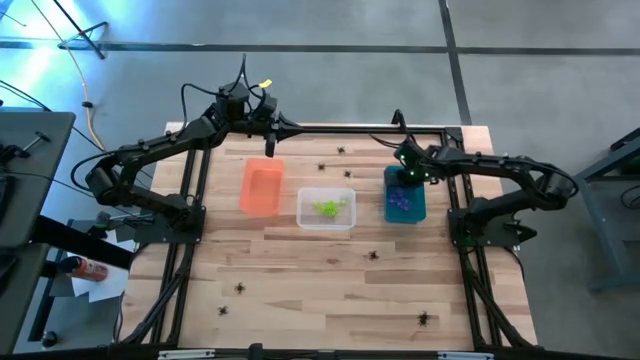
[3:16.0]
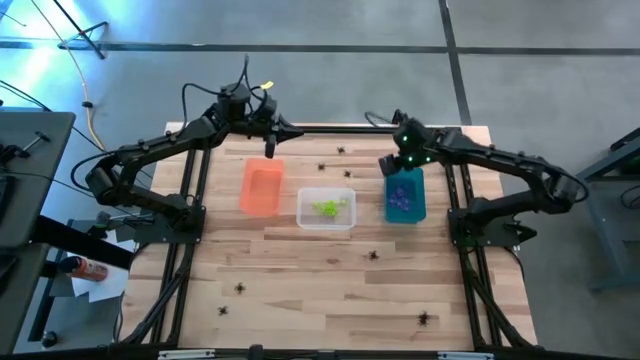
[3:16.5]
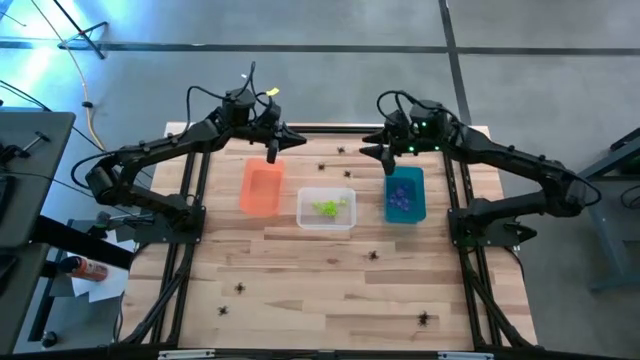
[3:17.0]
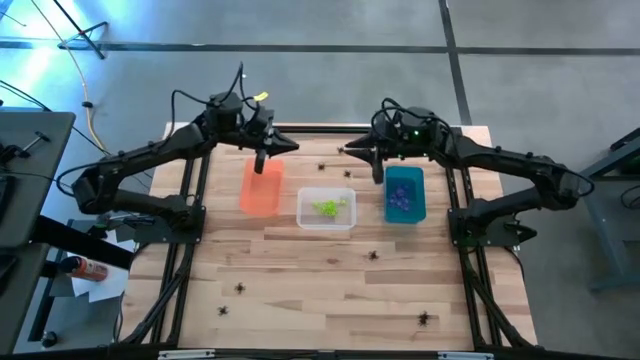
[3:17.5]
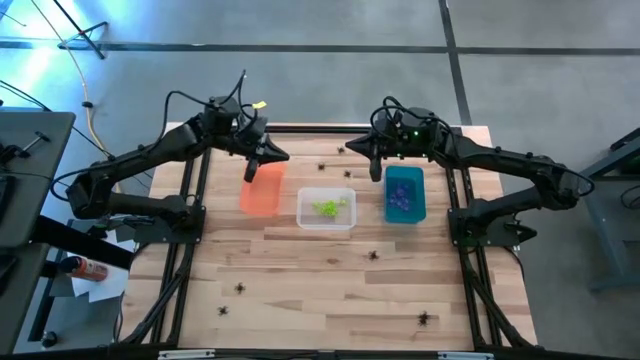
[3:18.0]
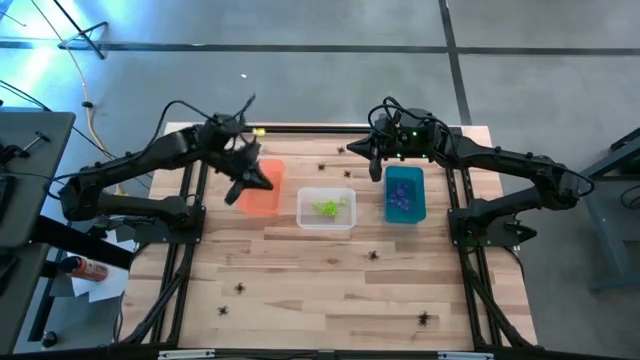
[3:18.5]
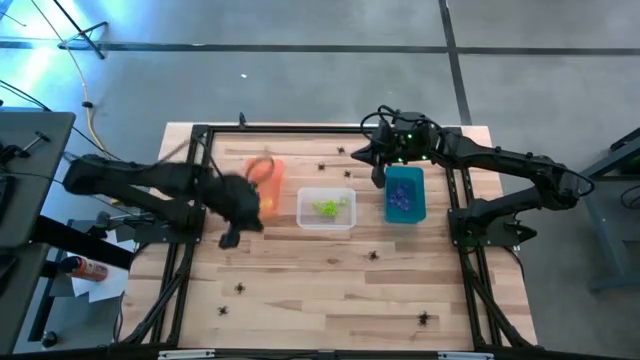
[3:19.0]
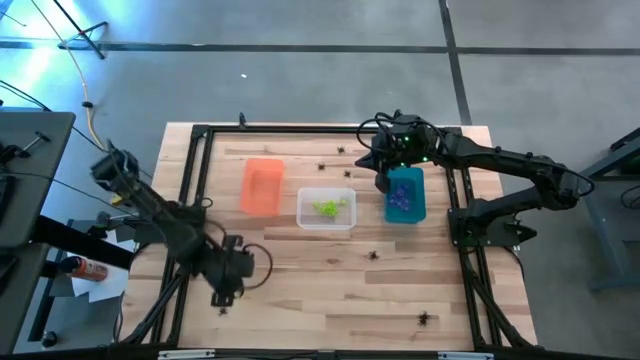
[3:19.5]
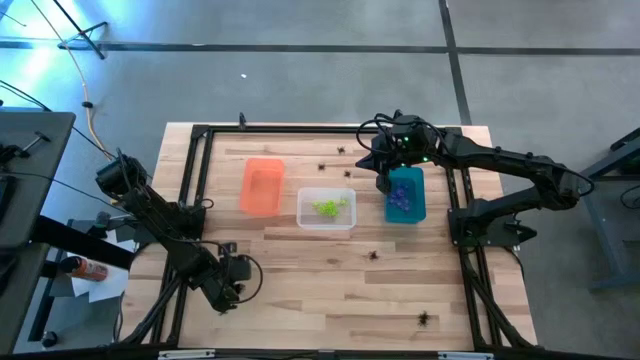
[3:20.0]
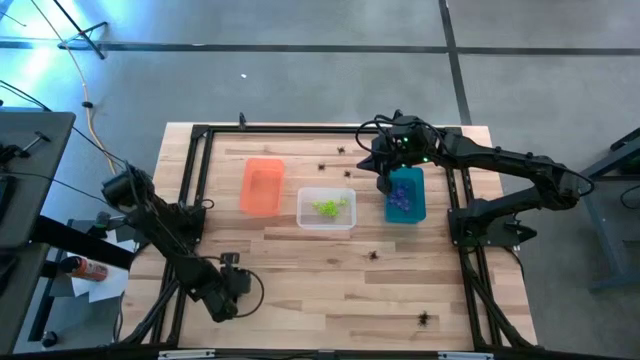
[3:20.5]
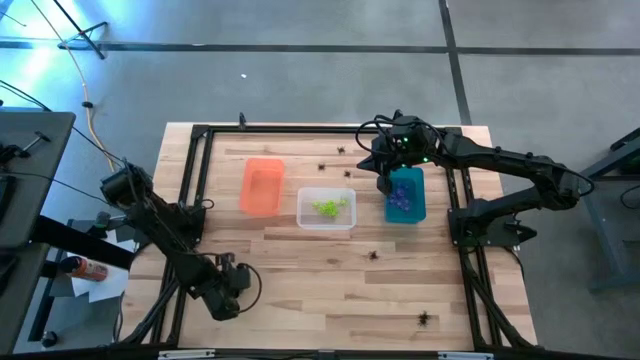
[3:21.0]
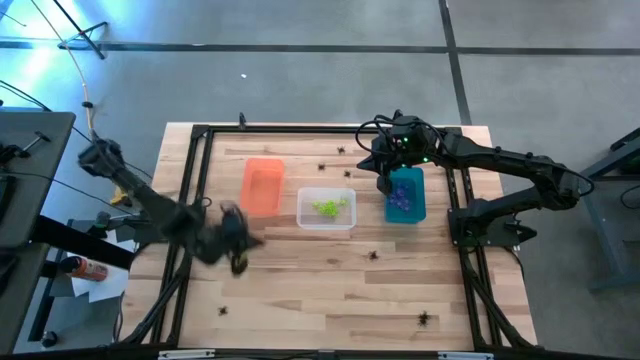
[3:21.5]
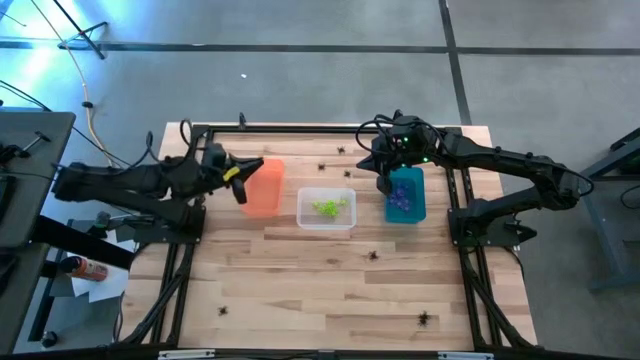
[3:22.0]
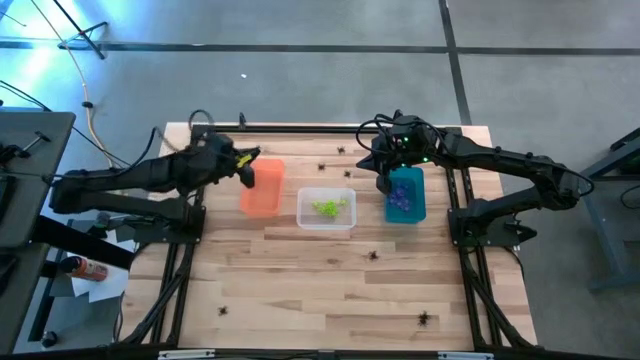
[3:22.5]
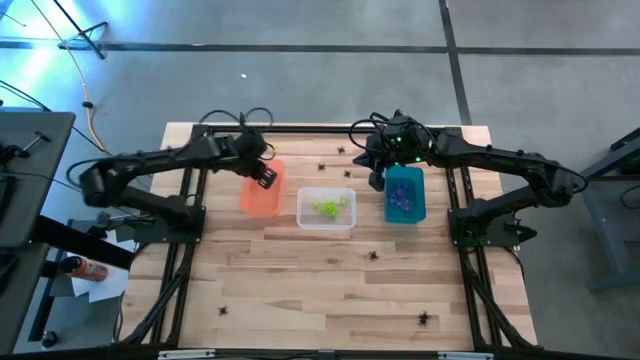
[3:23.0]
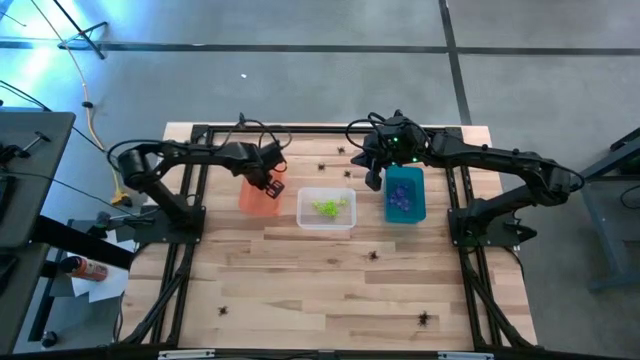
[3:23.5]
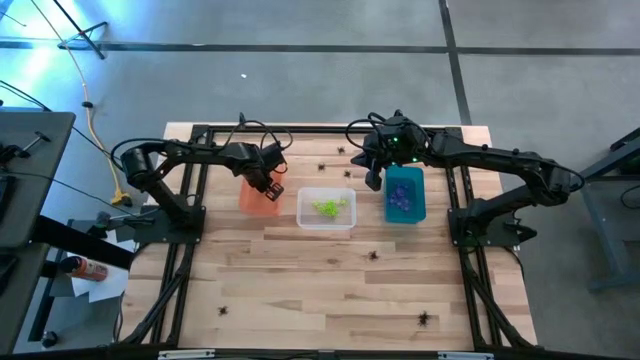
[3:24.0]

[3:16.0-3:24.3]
Task: Sort Halloween decoration
Put the black spider toy into the orange bin

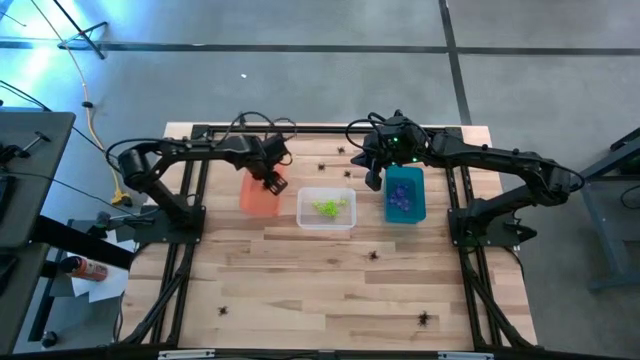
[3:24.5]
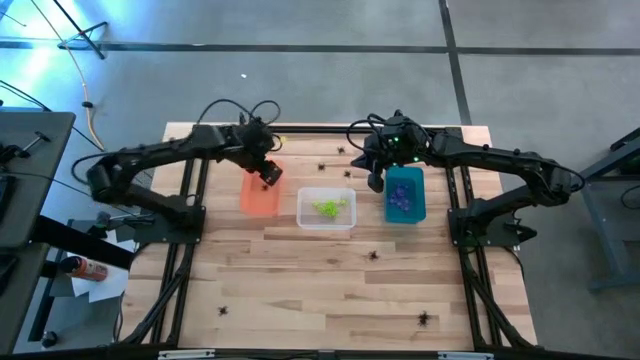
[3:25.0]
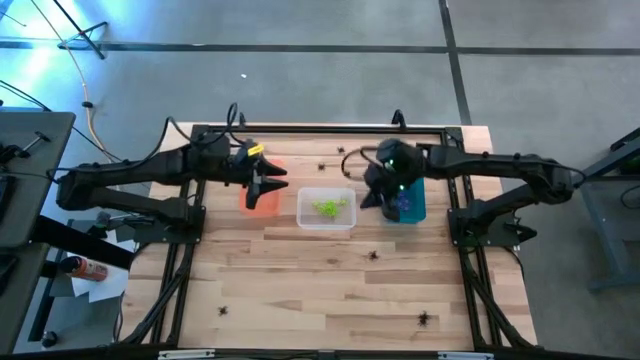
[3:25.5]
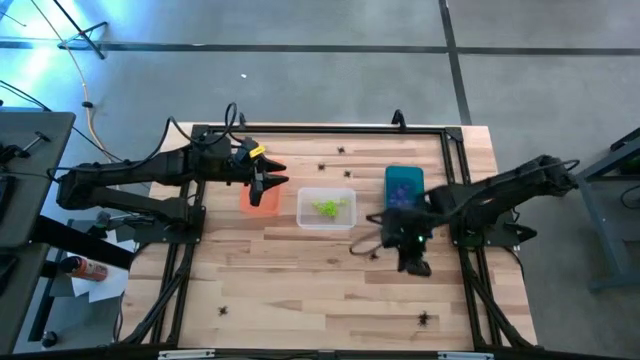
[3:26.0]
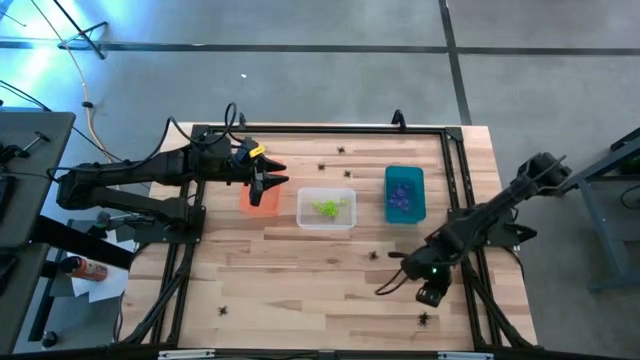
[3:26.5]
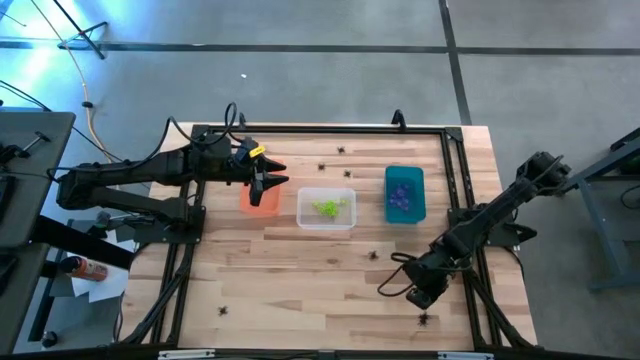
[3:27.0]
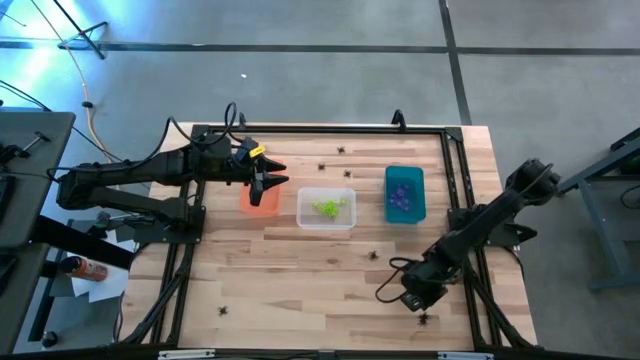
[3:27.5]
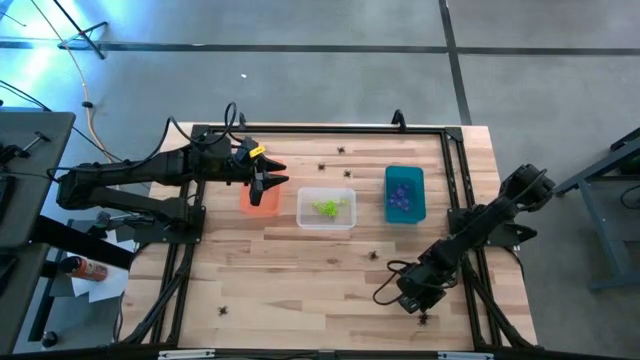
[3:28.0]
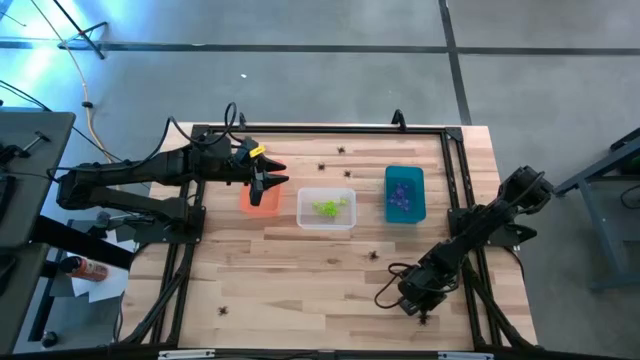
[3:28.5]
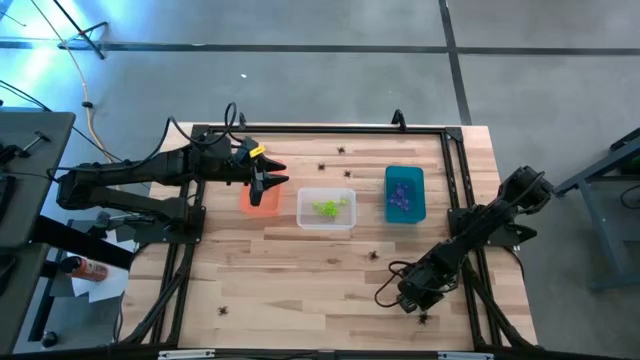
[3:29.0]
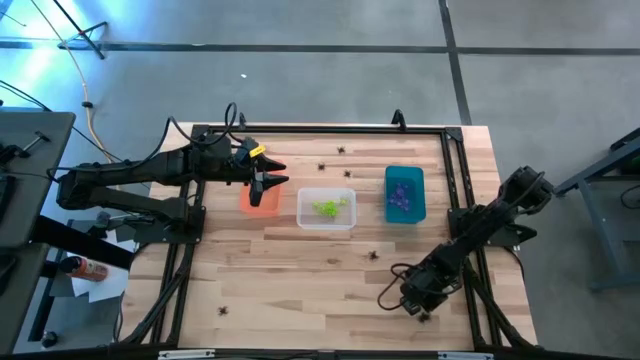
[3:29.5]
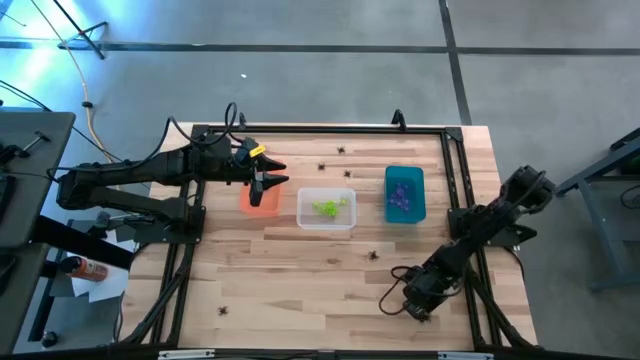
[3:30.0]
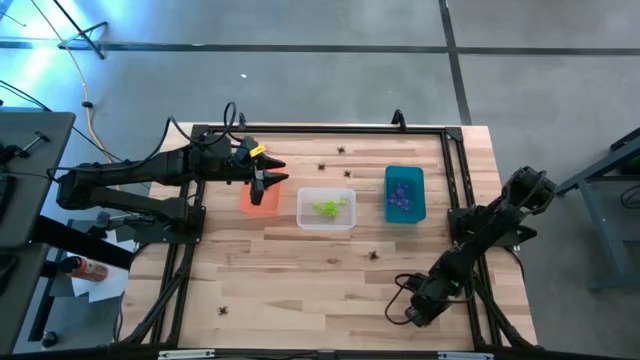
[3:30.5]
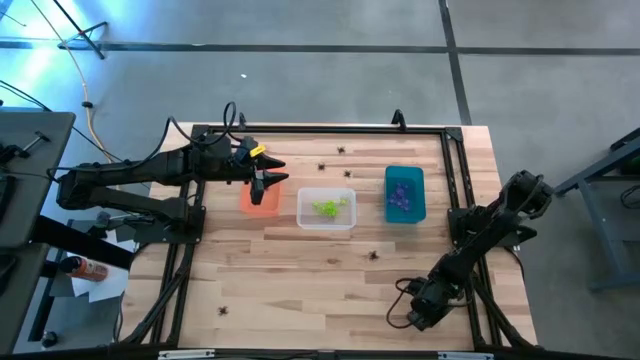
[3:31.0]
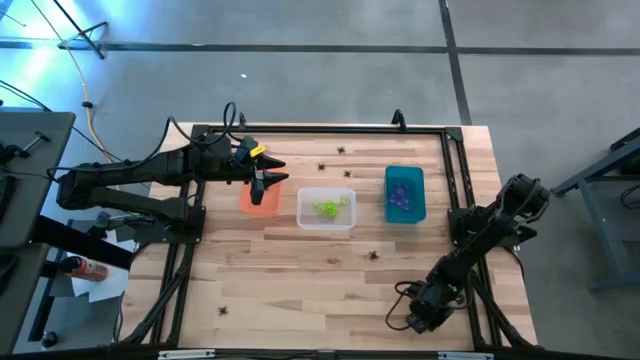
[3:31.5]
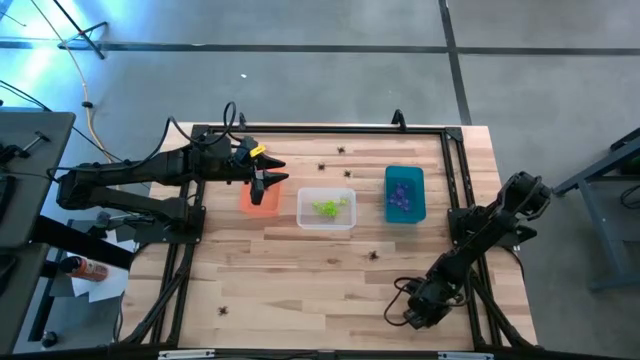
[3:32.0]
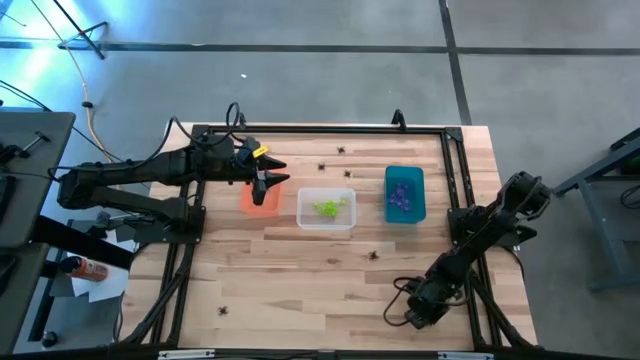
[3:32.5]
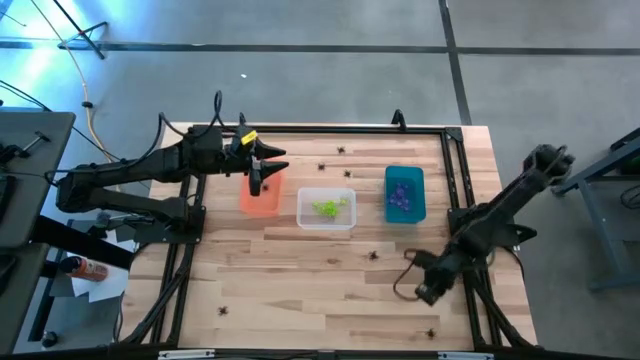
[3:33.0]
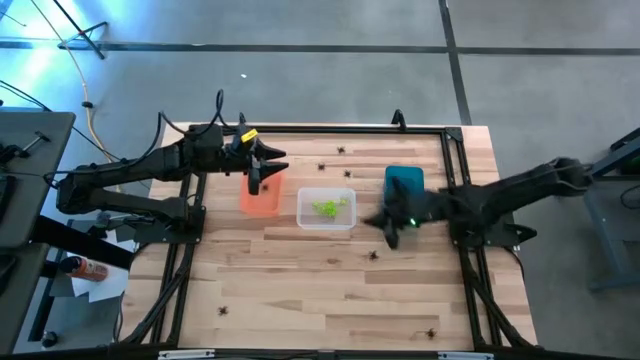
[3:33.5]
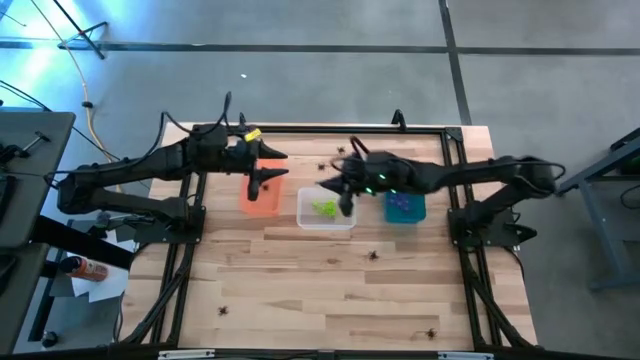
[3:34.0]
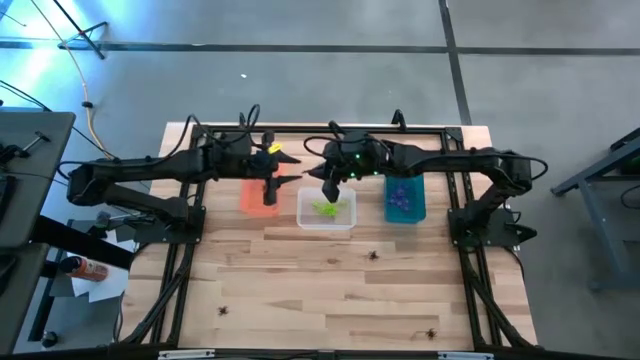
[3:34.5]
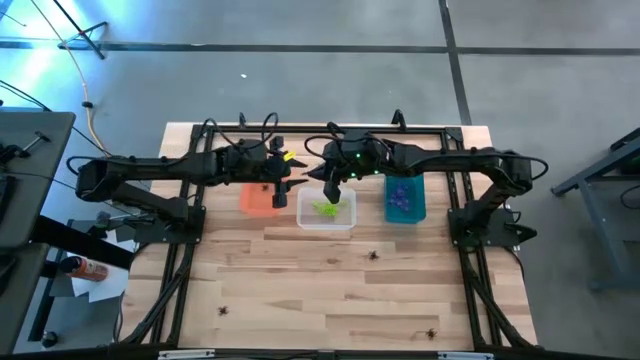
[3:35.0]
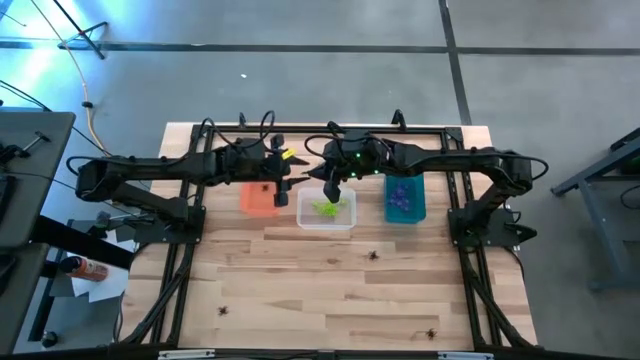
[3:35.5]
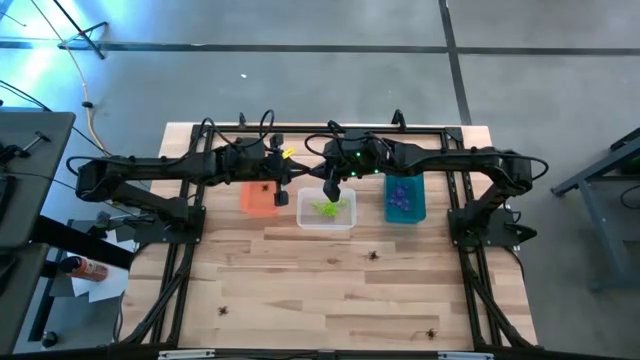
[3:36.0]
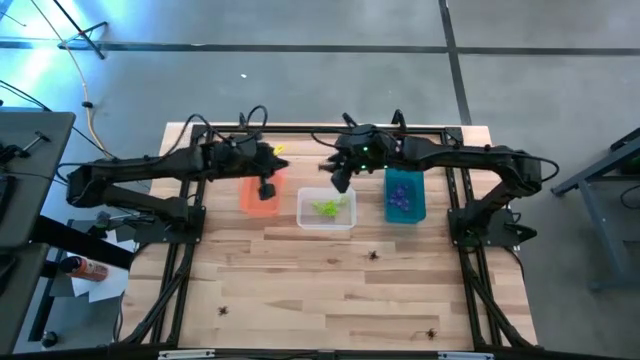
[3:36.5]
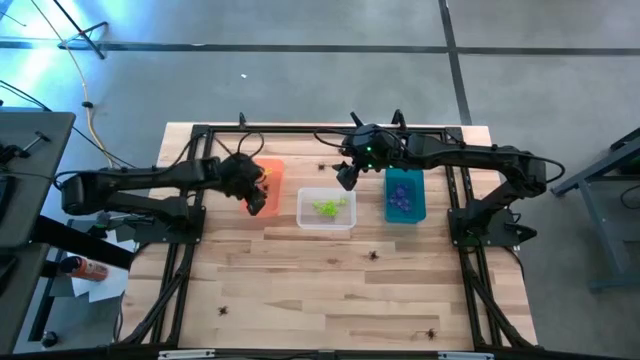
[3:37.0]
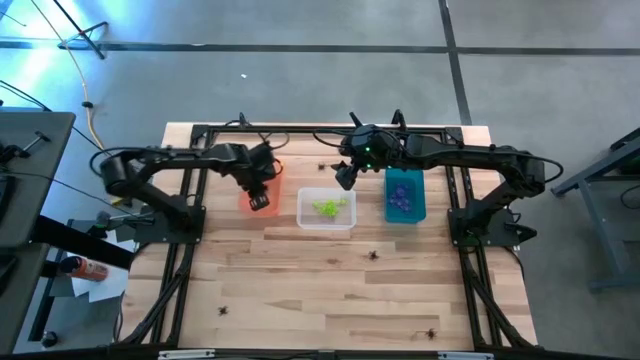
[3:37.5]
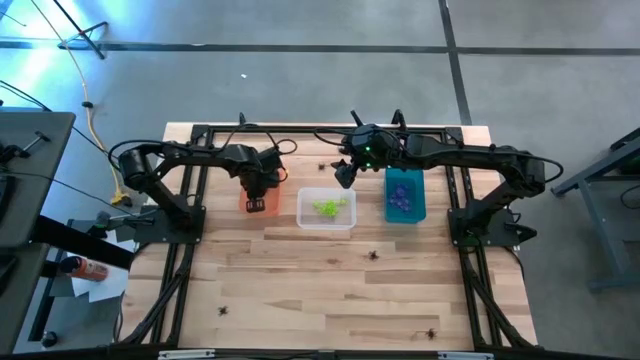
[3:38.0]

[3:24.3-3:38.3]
Put the black spider toy into the orange bin
